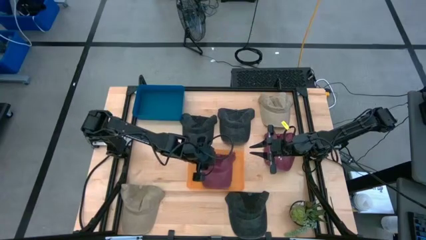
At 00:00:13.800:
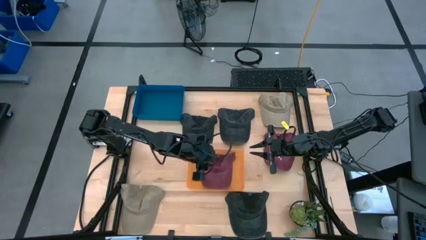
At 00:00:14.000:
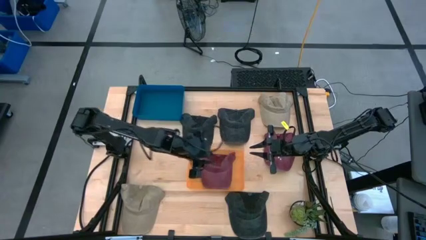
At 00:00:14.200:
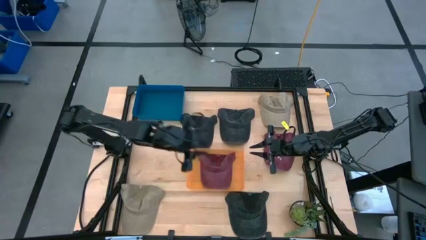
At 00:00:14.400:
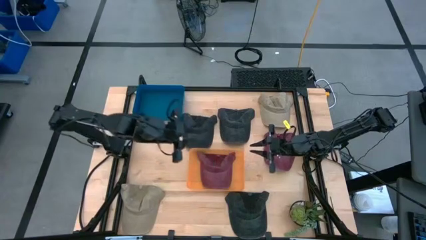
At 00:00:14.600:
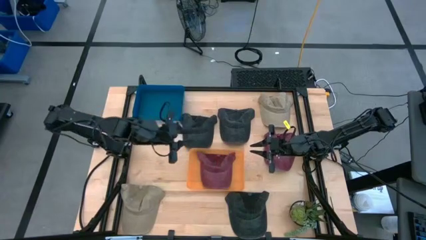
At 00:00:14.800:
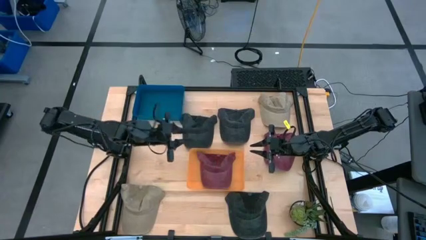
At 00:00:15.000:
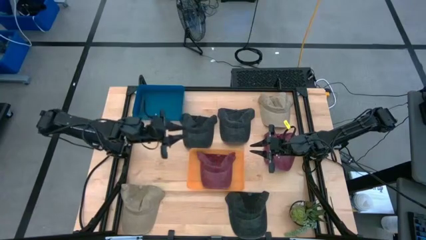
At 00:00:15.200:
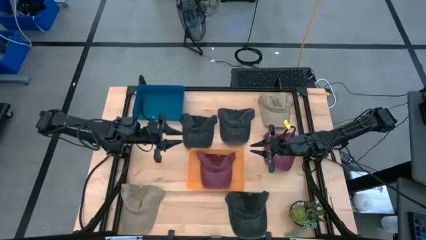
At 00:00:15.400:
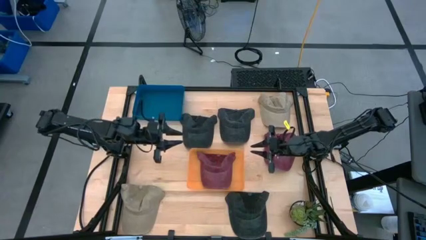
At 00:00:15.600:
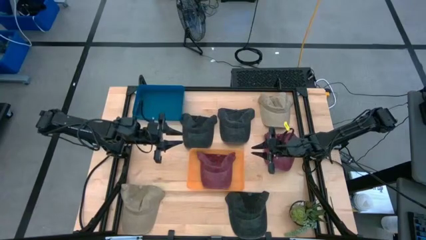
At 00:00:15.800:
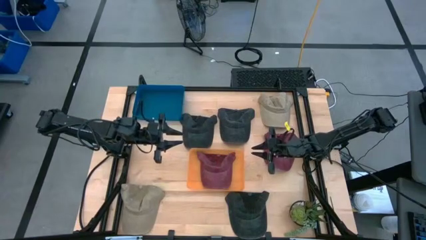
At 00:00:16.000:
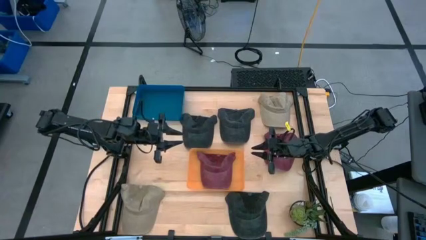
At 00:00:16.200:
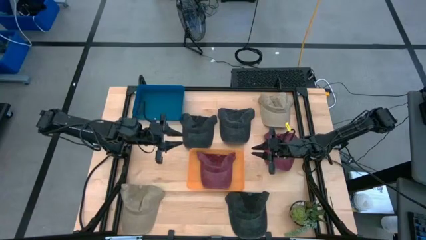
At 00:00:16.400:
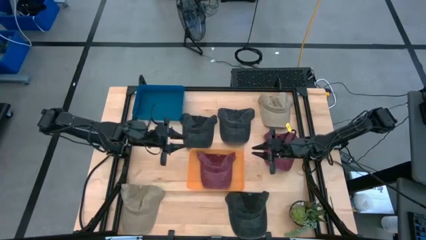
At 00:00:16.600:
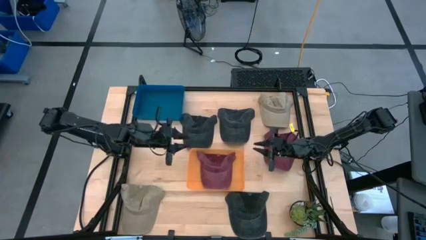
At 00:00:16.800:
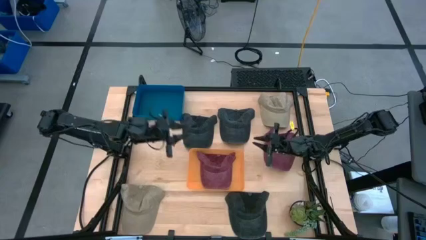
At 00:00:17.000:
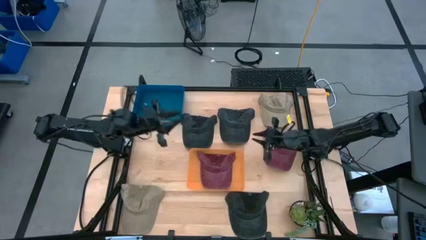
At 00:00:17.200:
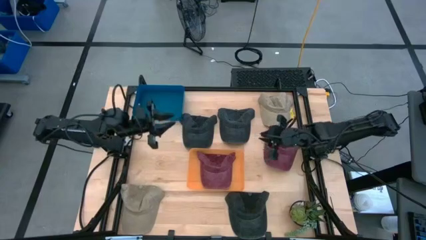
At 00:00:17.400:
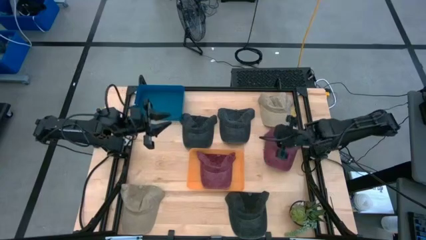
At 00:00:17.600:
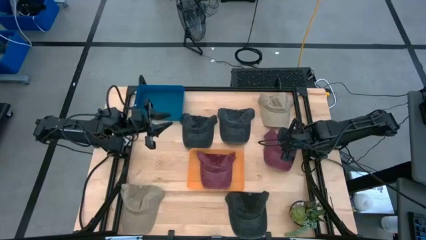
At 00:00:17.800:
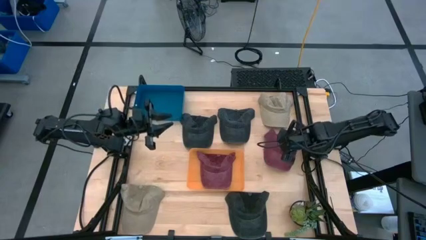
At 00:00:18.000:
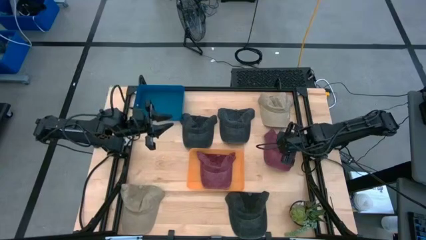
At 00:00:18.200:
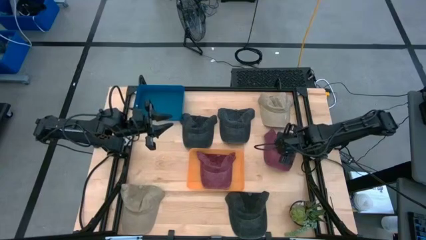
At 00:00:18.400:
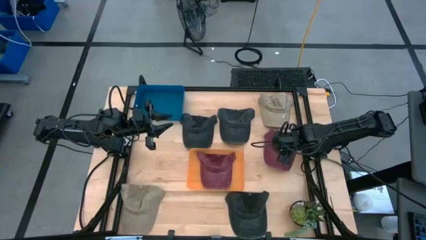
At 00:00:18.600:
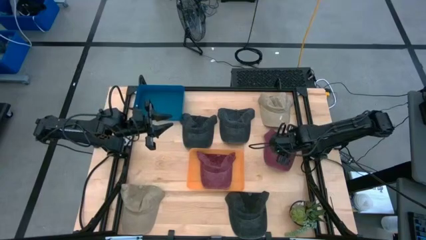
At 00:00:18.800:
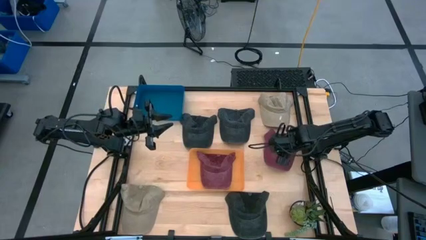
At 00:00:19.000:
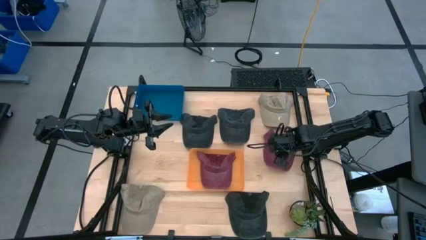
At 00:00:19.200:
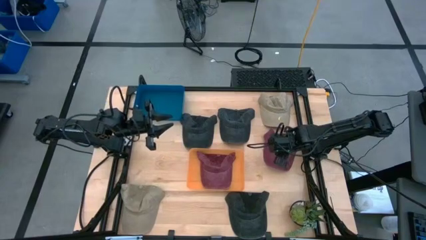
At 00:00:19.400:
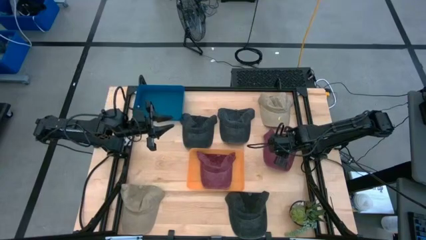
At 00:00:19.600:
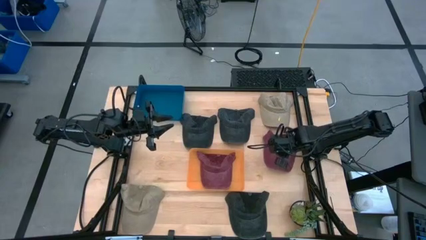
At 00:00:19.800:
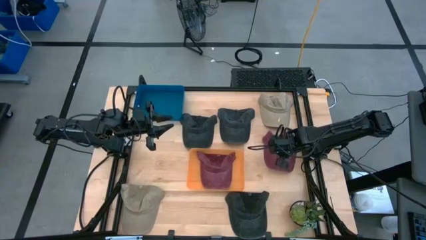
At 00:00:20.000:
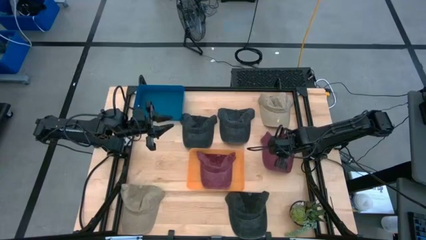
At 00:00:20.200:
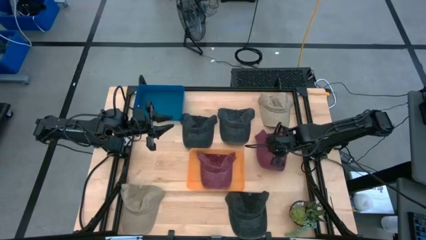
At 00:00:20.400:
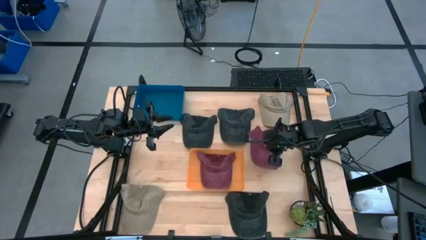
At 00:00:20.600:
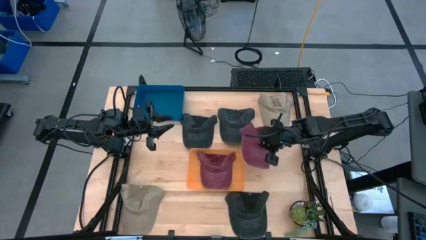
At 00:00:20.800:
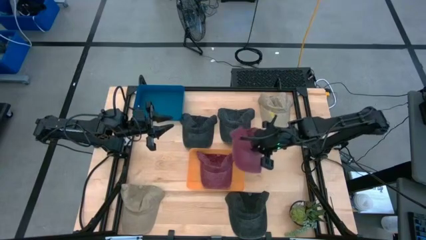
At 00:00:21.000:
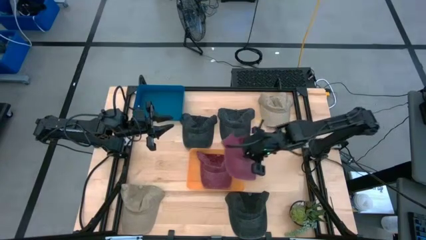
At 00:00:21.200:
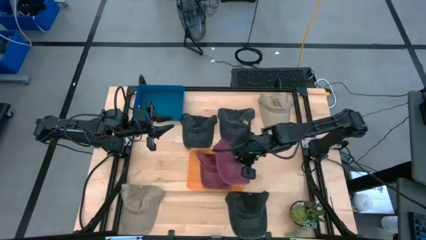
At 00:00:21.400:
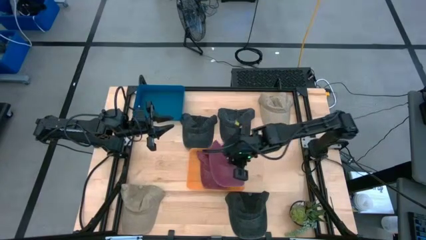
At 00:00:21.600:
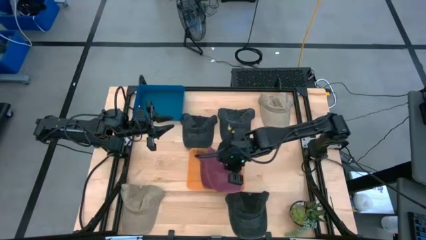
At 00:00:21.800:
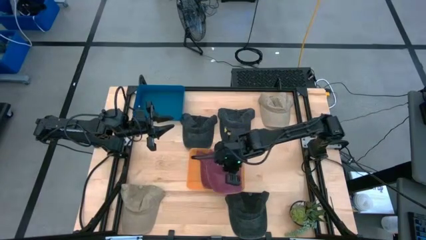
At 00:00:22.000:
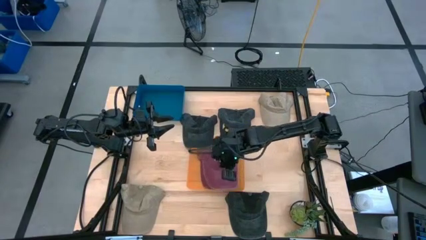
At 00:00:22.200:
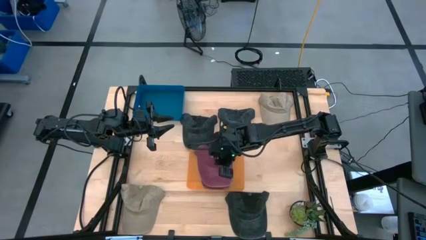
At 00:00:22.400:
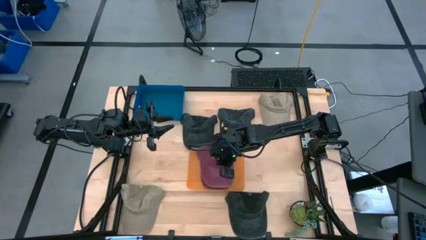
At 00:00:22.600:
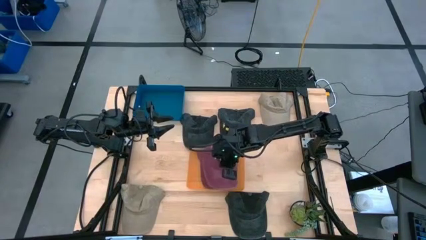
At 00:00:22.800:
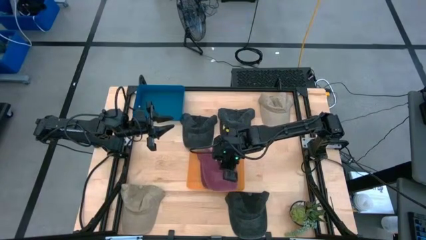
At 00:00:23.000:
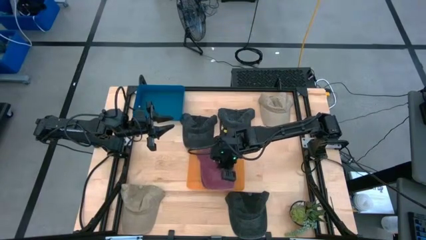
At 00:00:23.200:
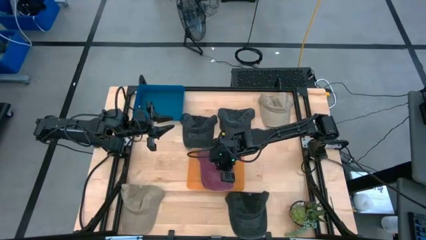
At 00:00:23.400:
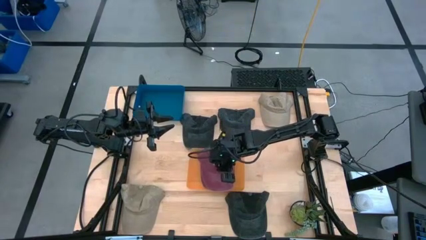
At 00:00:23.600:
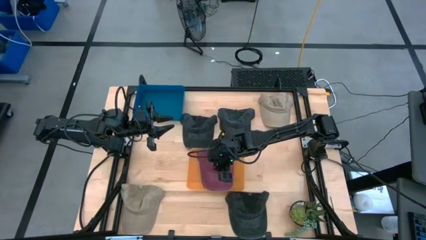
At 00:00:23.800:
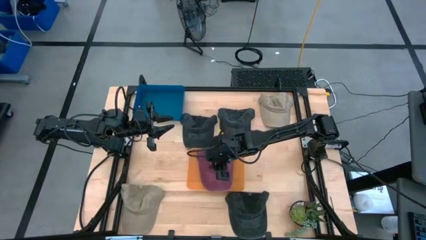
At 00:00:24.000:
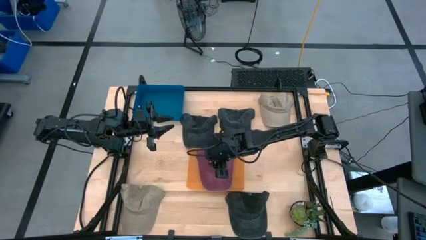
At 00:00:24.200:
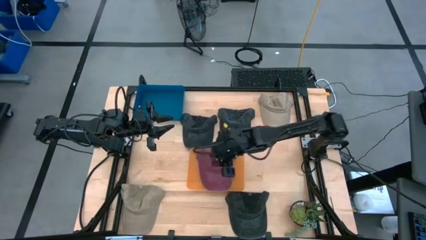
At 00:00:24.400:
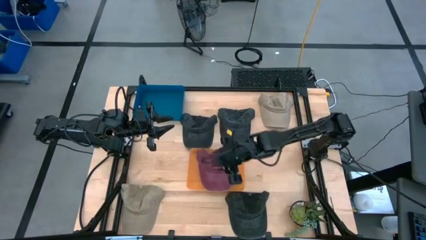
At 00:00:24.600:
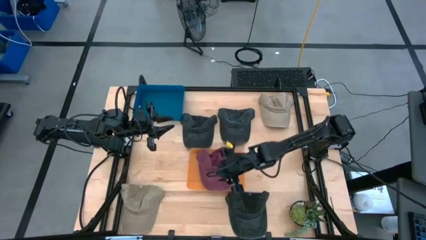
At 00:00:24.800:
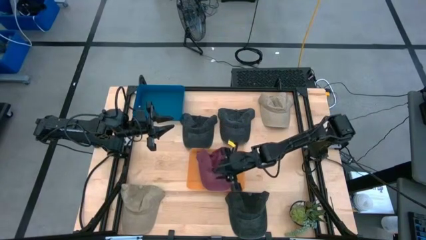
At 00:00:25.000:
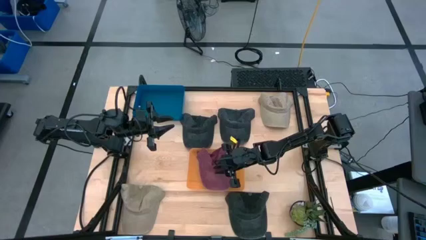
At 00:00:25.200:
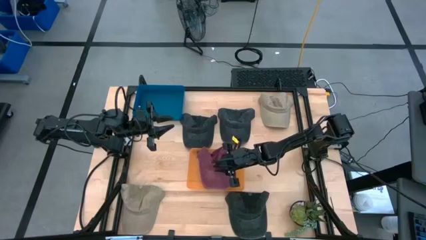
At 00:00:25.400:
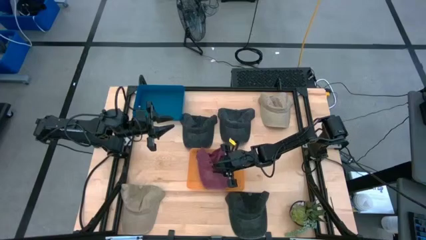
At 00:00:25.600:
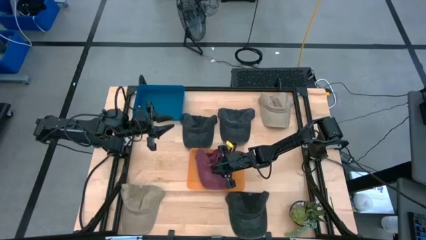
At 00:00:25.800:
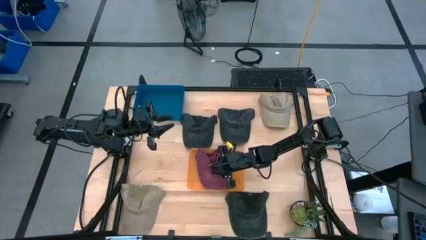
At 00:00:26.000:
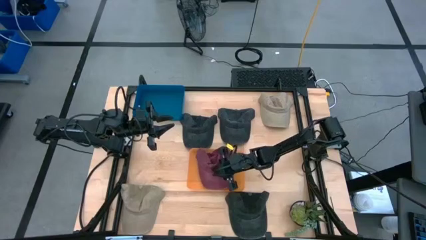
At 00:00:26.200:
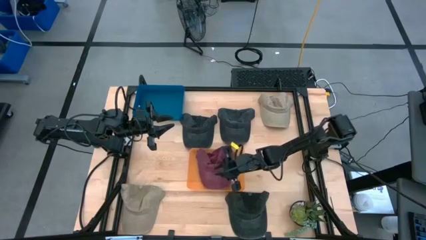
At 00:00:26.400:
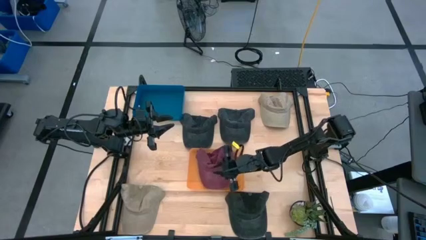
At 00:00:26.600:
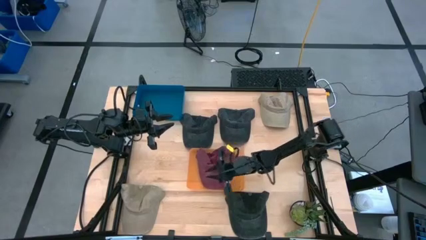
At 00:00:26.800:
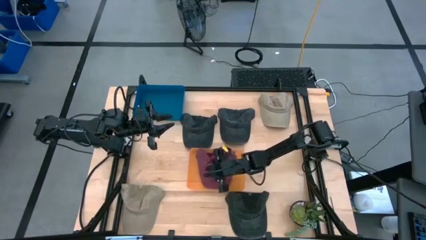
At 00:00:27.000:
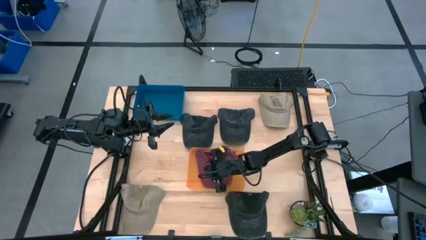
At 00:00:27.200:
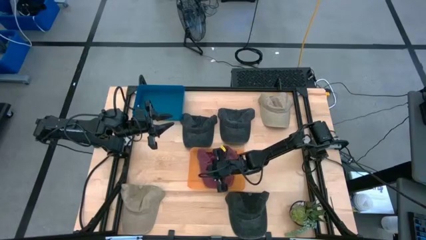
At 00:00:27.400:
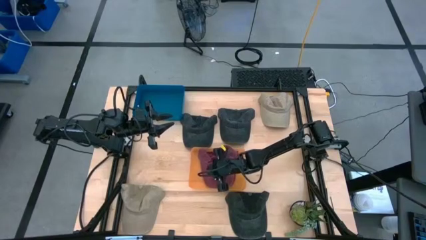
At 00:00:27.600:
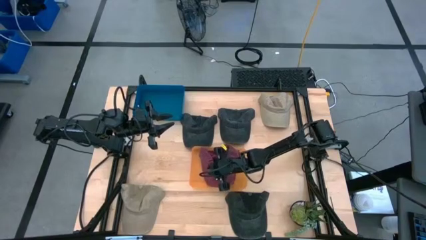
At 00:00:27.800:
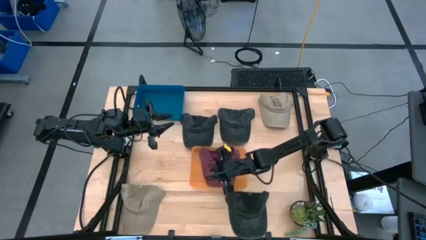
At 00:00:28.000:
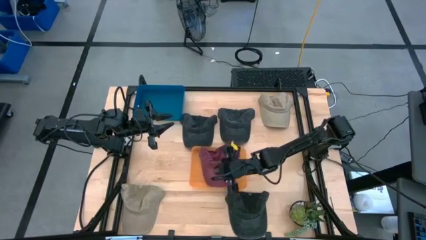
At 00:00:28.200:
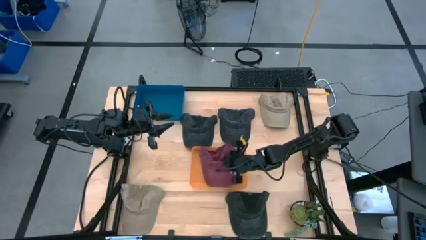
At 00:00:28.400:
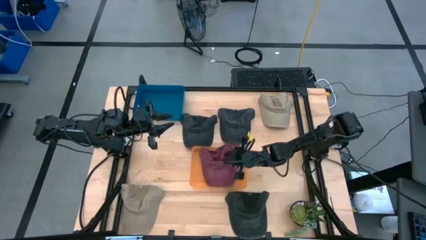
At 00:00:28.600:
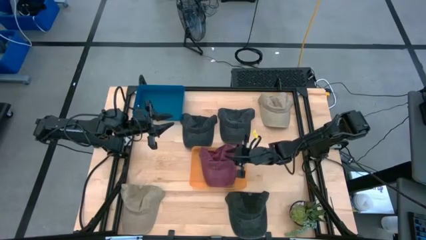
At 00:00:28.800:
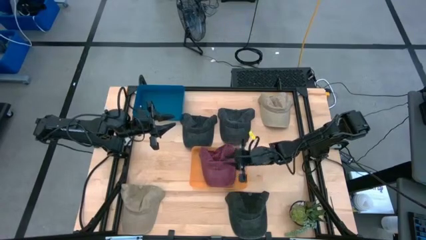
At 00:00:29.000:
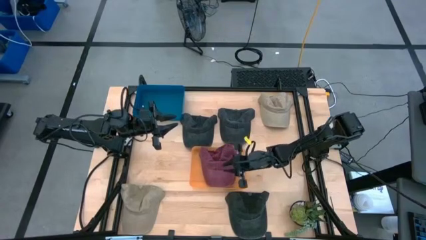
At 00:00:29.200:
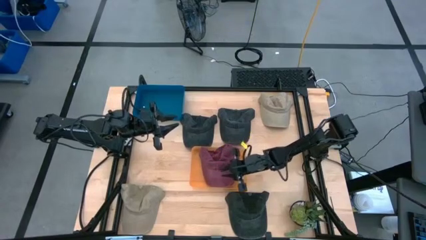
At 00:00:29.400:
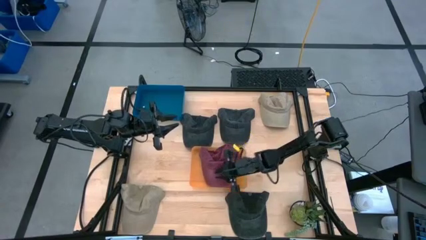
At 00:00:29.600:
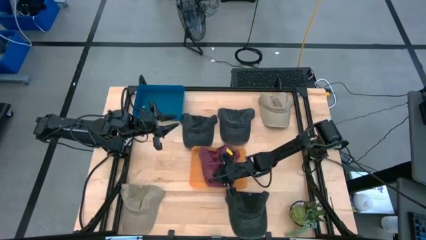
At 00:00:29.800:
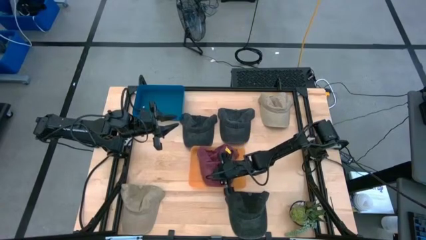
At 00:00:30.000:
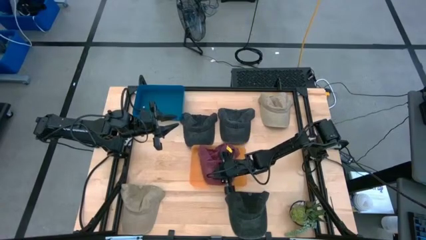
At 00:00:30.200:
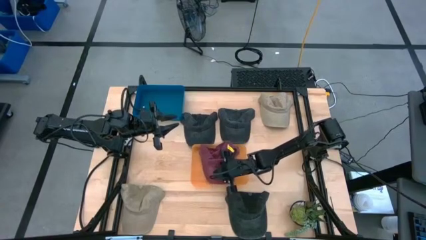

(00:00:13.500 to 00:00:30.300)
Task: Pick & Place hat
Put the red cap into the orange bin
